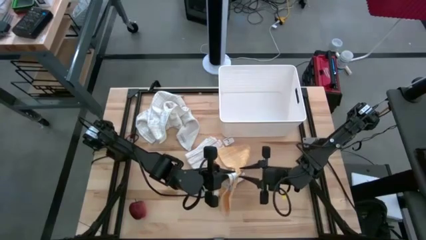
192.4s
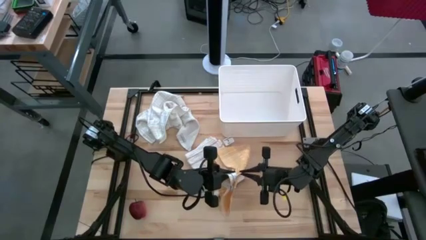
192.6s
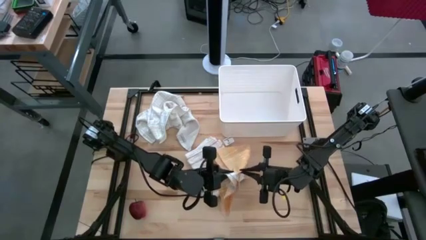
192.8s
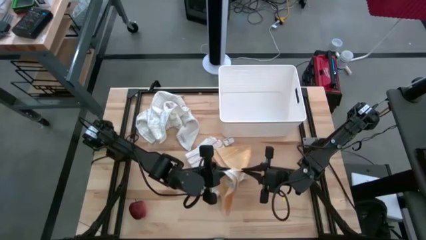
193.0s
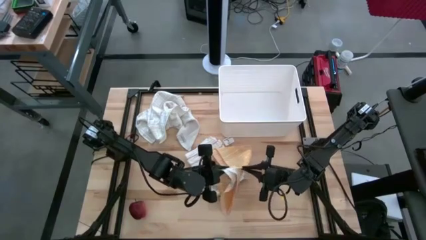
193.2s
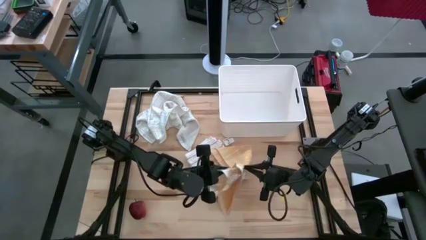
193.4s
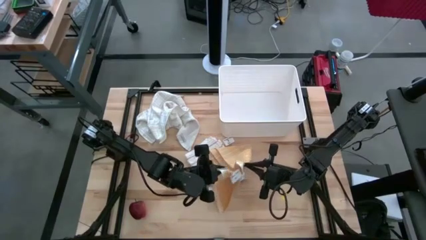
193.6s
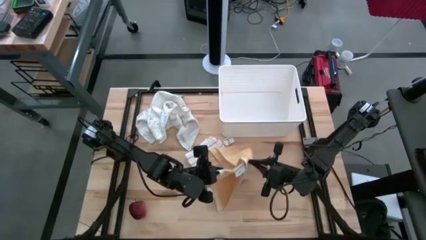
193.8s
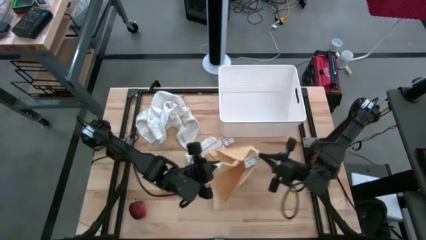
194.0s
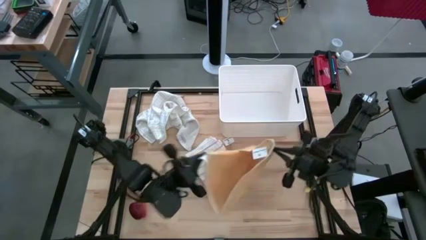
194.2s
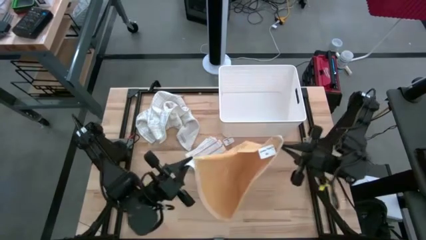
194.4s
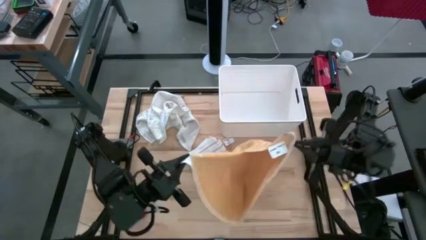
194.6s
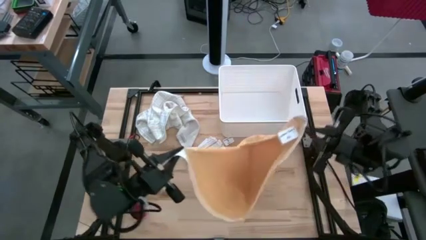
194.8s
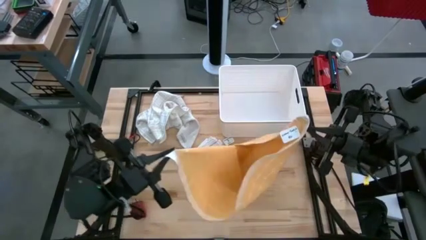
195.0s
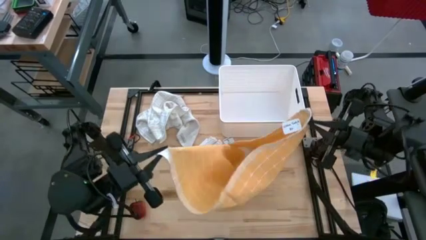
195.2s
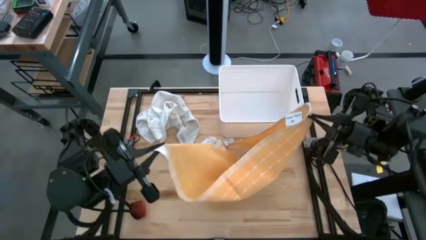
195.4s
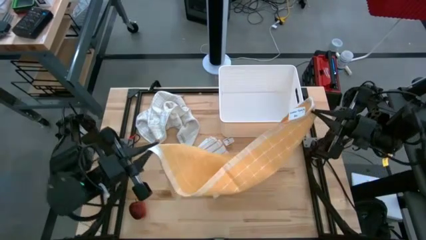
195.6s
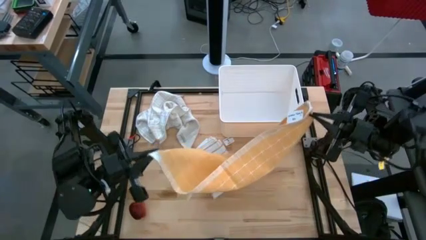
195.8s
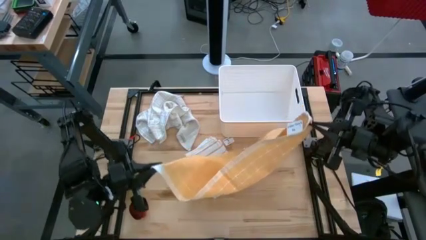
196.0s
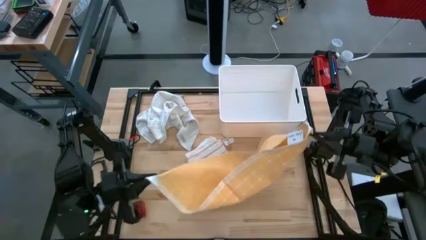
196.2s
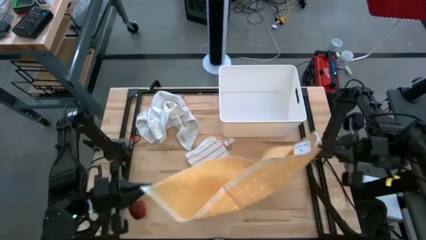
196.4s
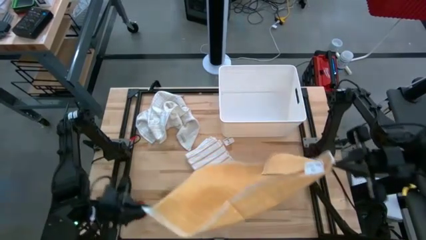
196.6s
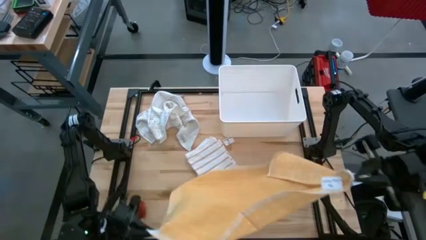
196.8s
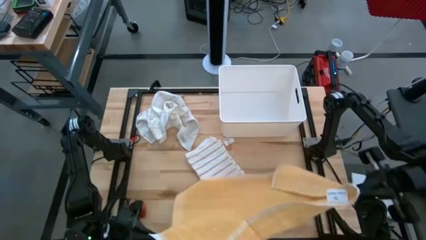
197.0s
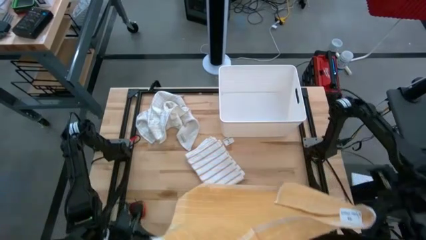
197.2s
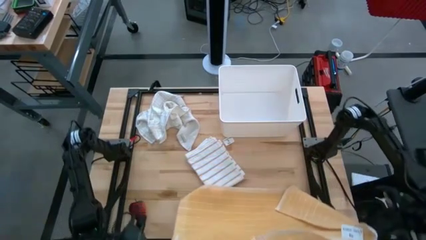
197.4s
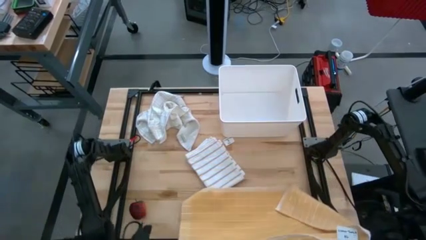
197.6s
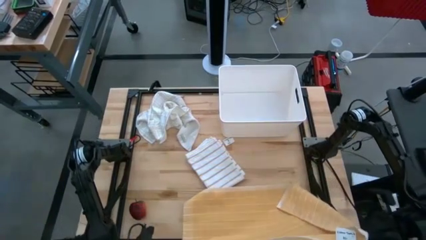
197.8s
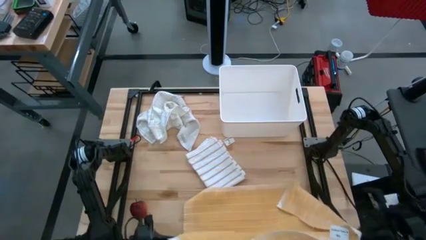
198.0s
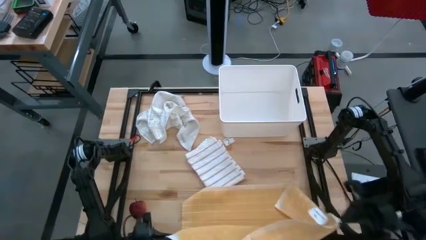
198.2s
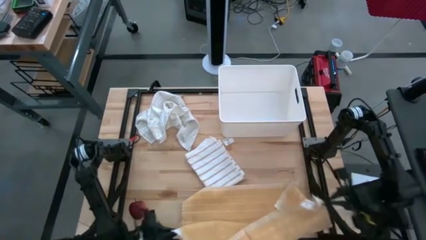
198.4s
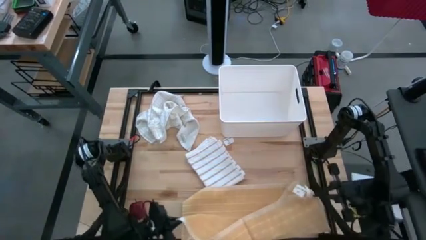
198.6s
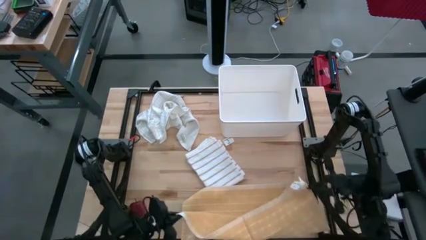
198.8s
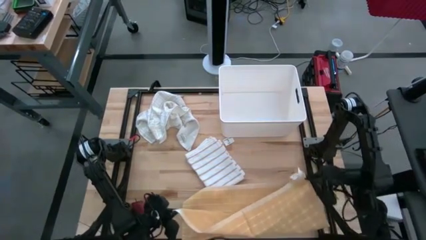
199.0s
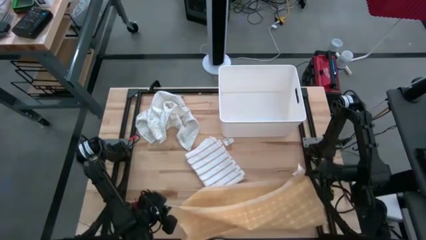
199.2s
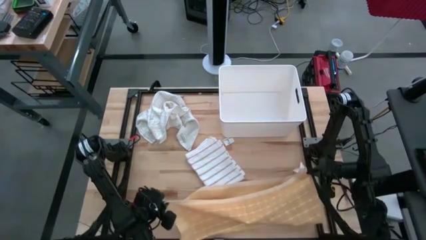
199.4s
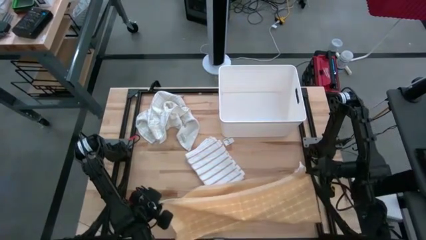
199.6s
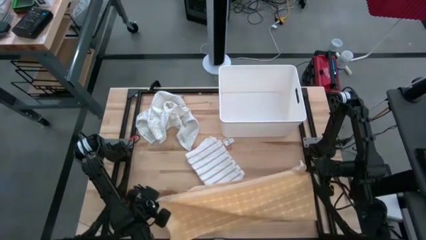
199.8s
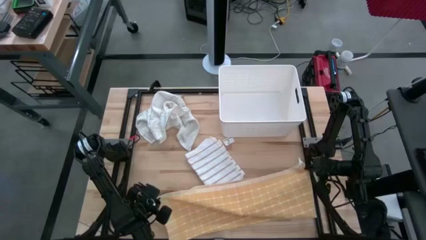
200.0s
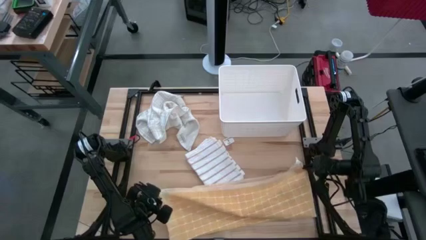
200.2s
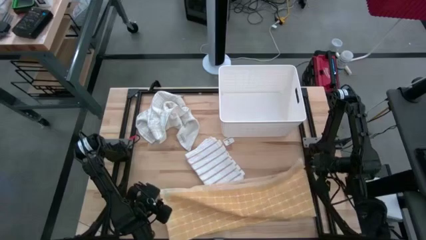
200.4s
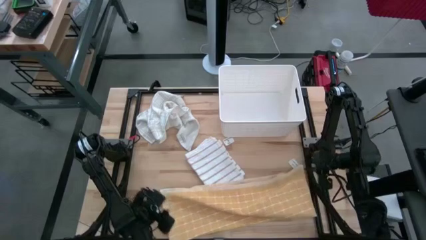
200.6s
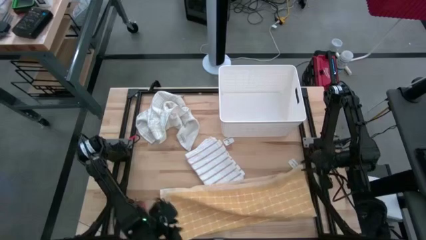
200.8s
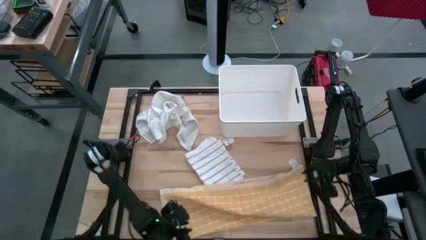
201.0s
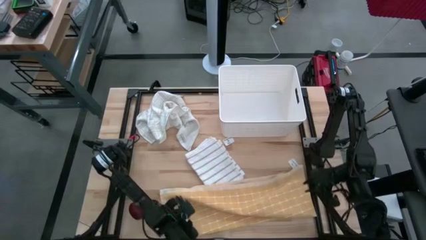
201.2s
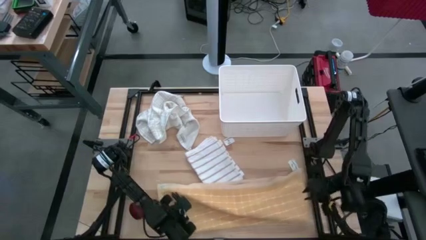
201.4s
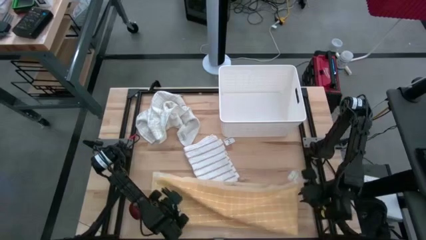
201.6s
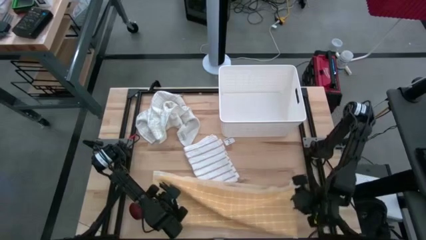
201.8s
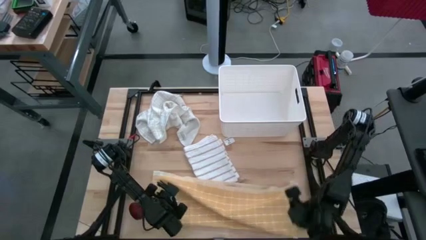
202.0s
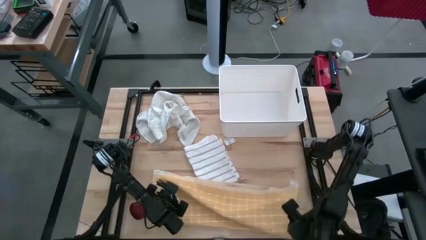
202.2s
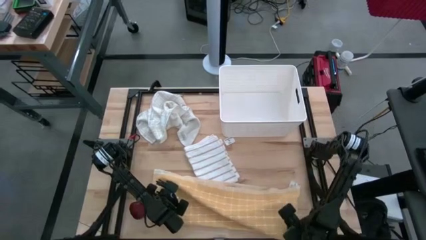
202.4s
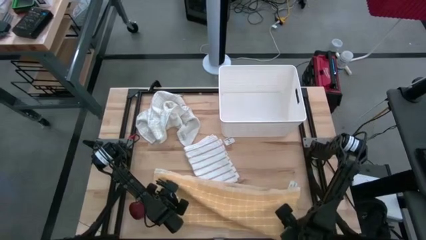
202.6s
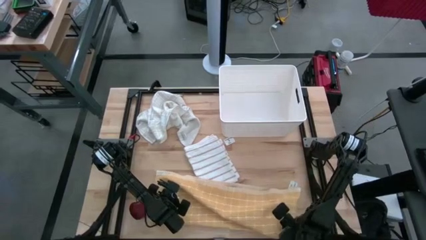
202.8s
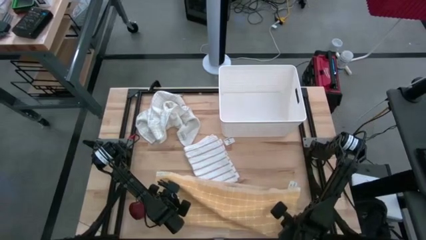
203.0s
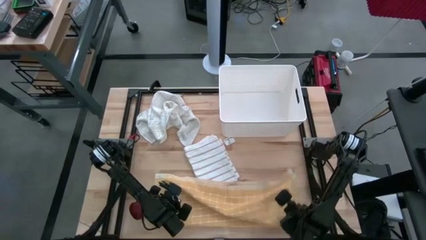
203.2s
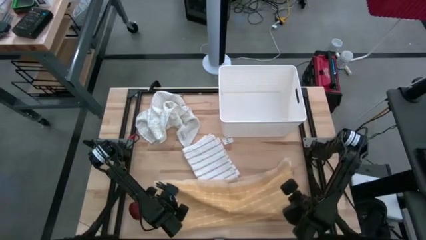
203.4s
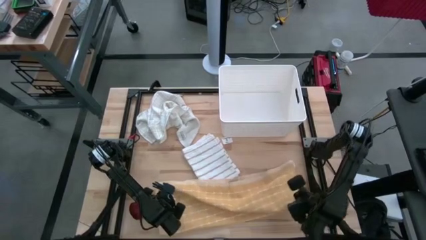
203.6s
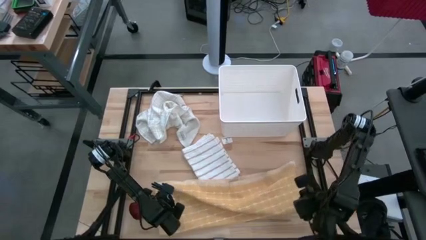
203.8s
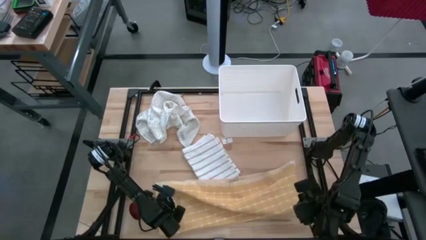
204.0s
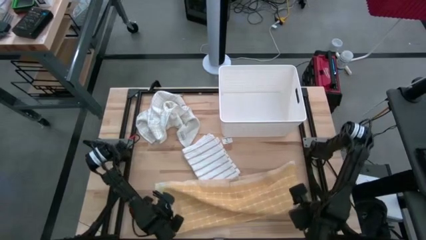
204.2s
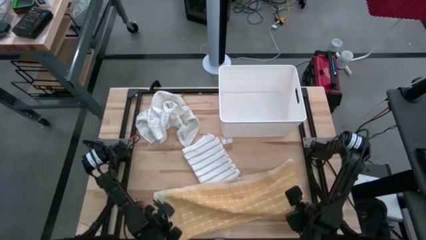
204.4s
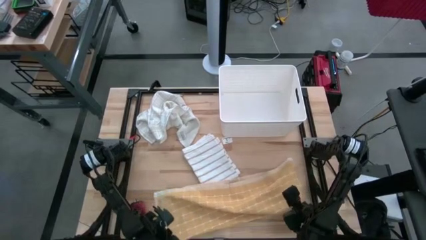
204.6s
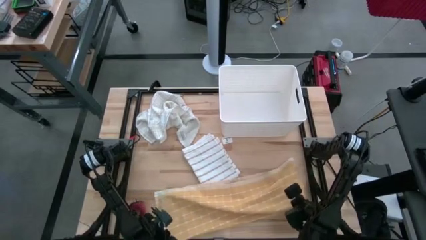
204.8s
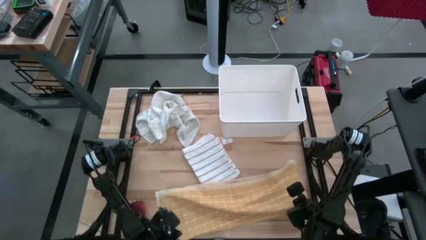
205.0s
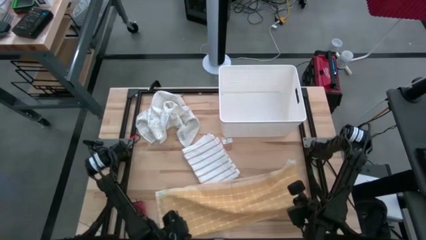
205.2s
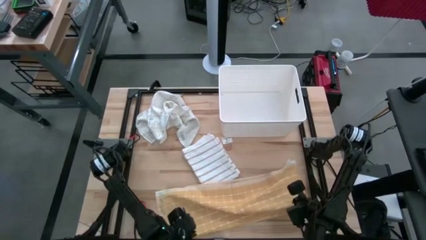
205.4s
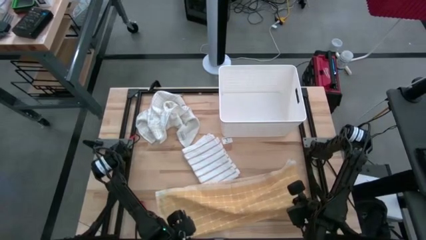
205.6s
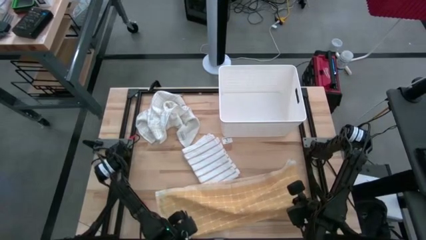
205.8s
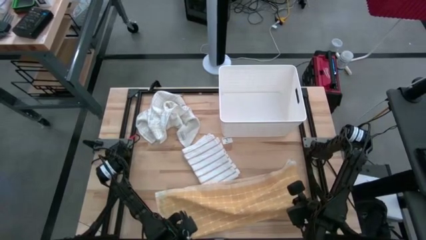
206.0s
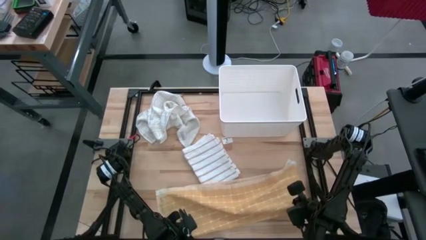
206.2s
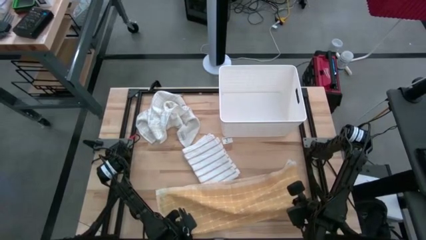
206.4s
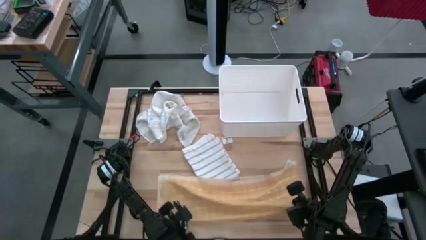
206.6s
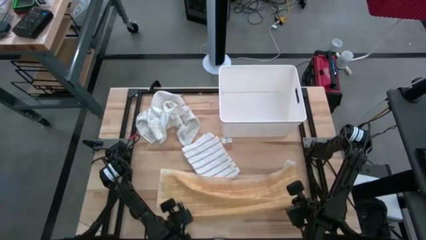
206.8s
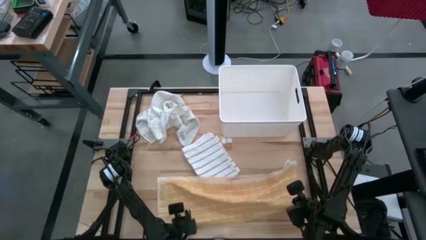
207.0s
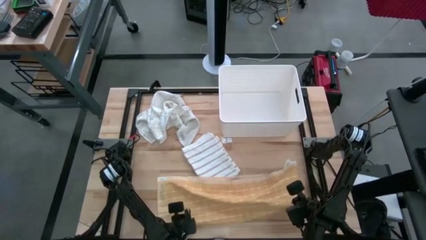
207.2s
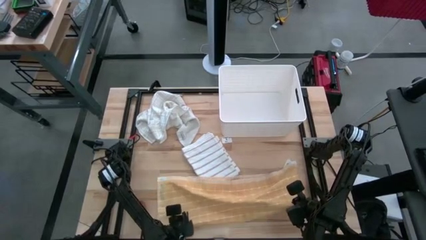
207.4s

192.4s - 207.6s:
Task: Fold towel
Fold the yellow squared towel

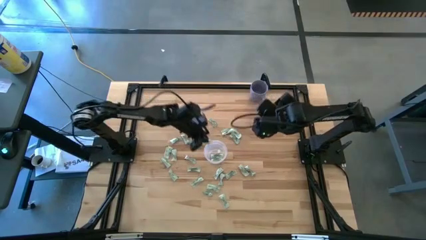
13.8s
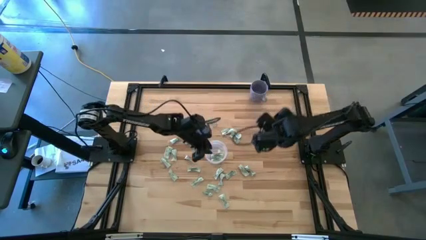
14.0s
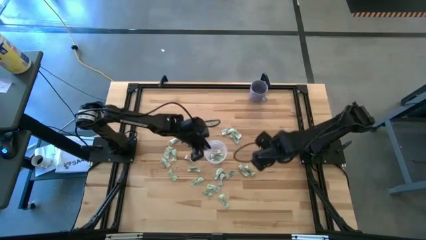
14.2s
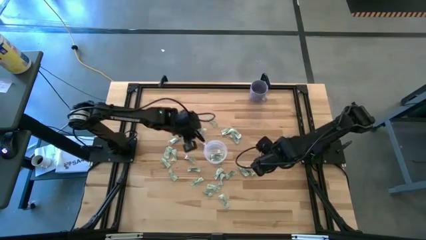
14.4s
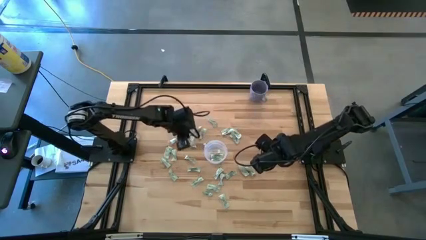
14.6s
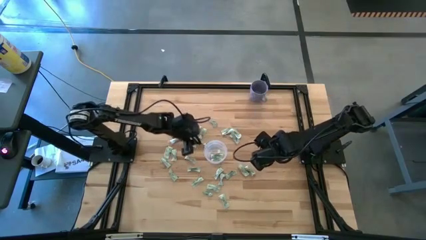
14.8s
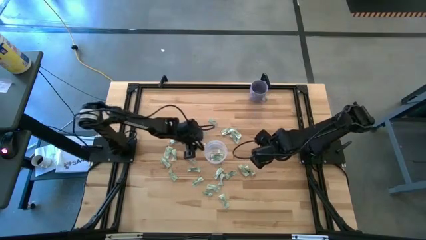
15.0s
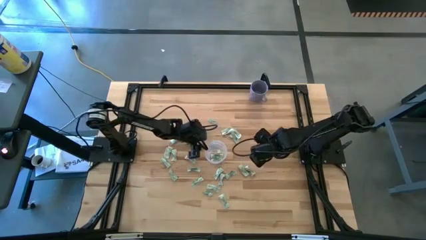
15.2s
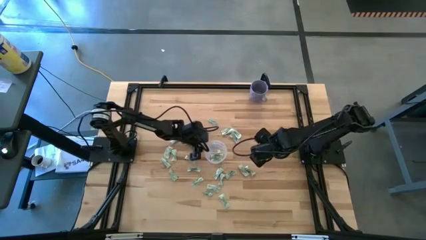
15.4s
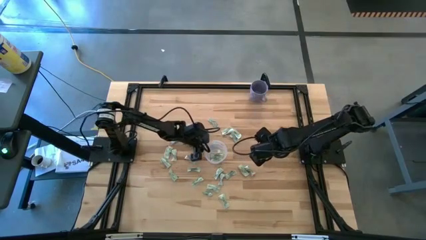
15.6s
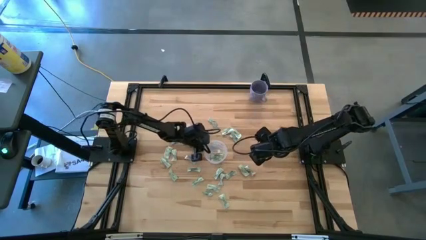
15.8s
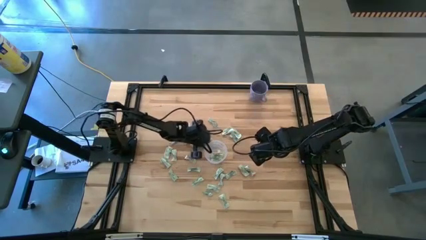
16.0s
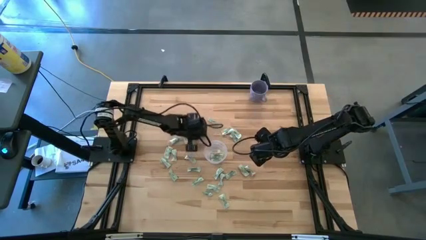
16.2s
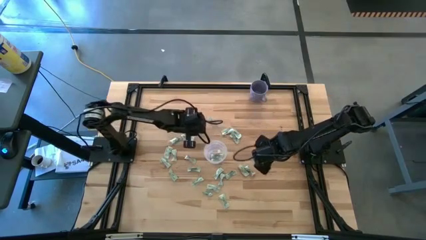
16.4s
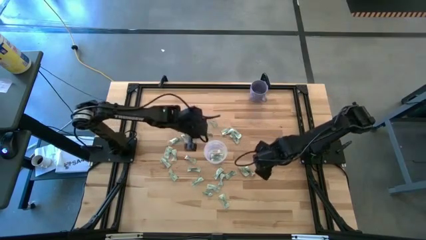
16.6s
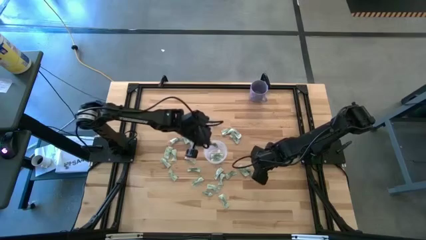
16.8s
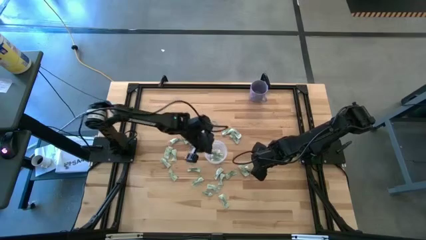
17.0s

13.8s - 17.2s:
Task: Pick and place Stevia / Truvia into bins
Put the green stevia packet into the transparent container
